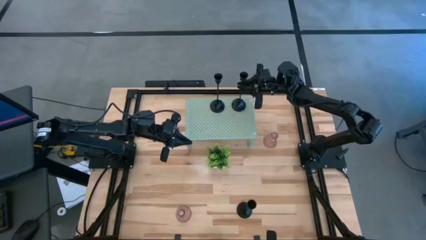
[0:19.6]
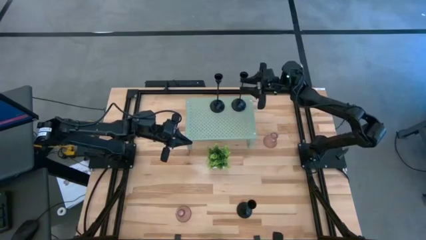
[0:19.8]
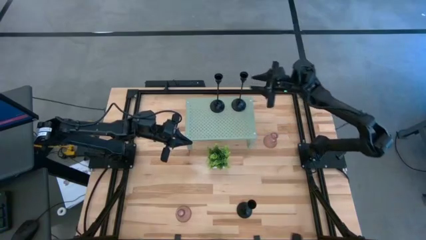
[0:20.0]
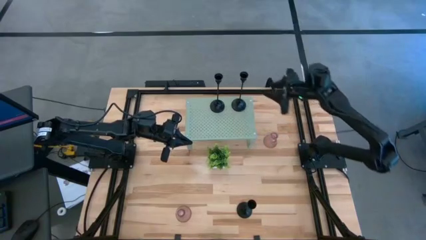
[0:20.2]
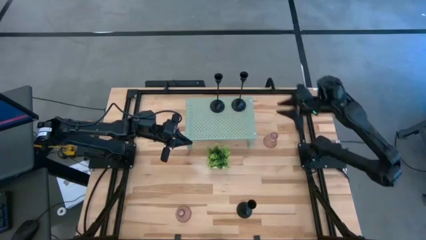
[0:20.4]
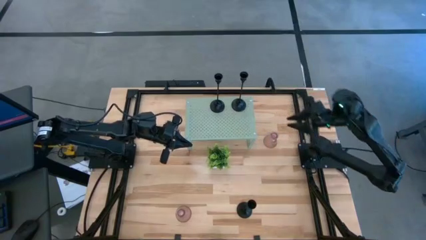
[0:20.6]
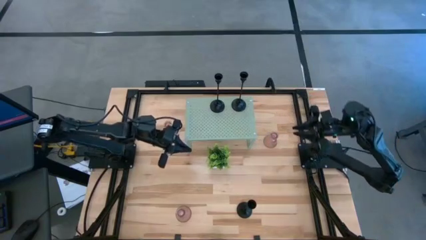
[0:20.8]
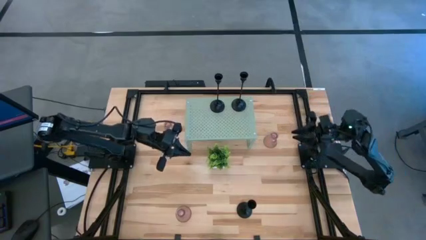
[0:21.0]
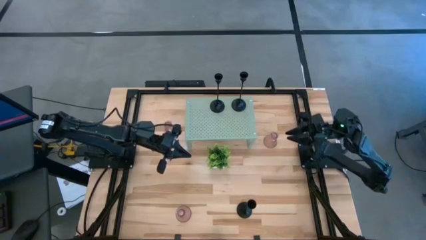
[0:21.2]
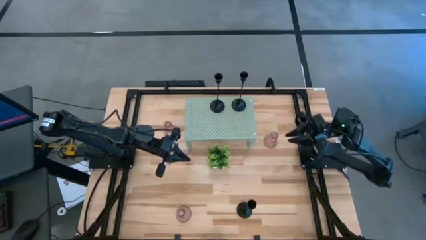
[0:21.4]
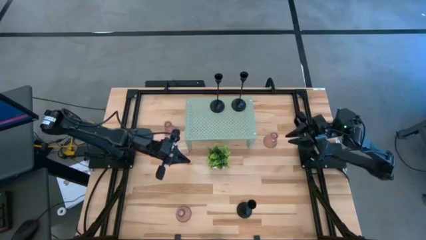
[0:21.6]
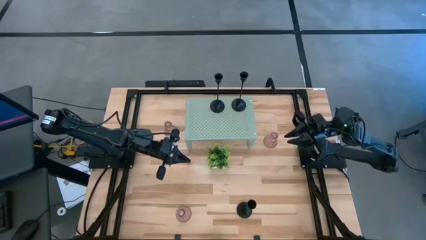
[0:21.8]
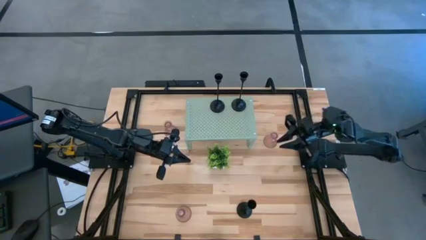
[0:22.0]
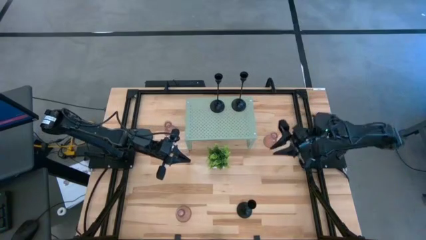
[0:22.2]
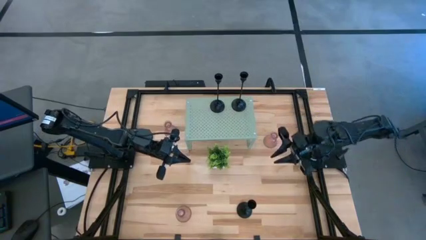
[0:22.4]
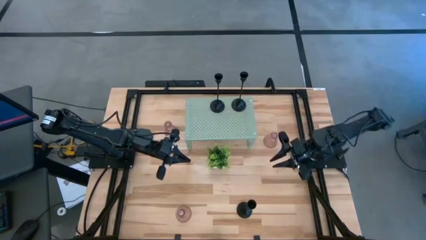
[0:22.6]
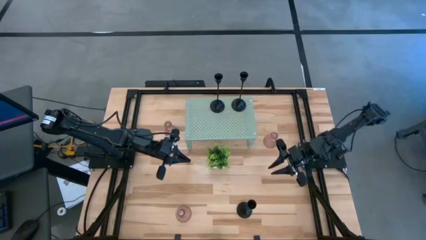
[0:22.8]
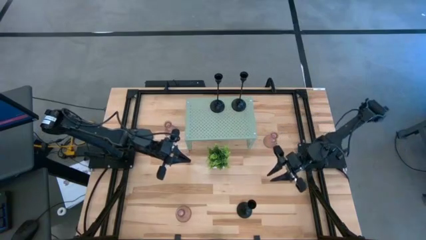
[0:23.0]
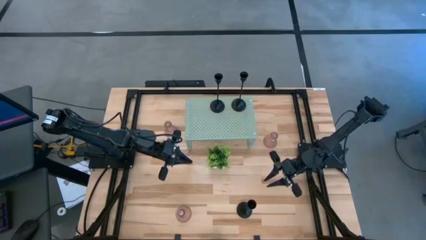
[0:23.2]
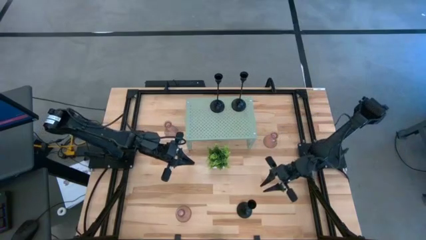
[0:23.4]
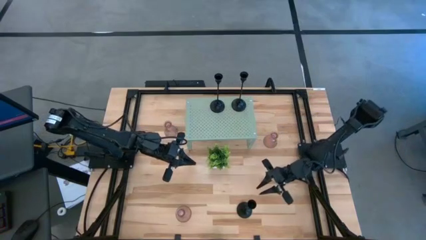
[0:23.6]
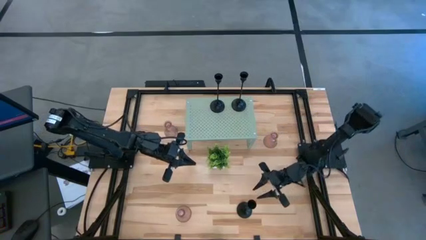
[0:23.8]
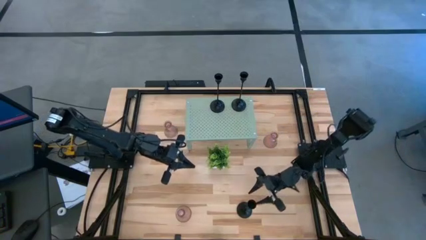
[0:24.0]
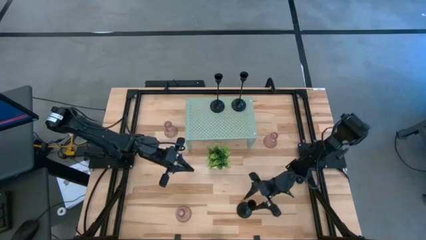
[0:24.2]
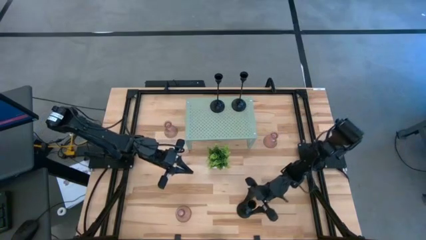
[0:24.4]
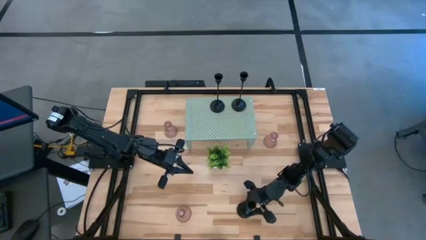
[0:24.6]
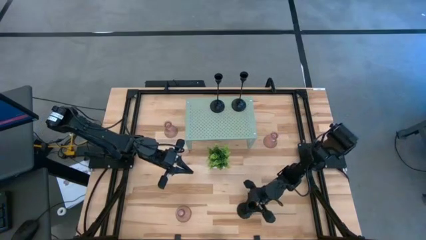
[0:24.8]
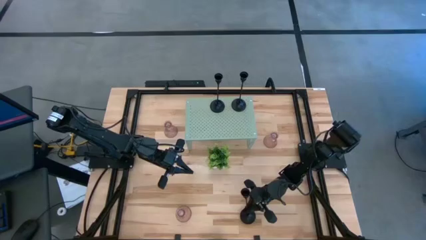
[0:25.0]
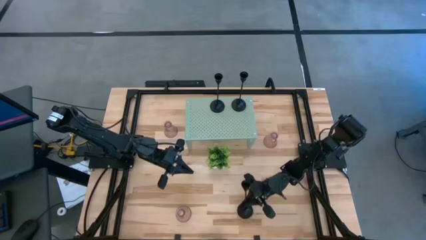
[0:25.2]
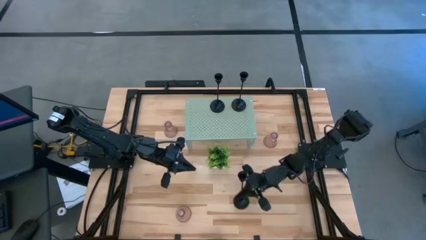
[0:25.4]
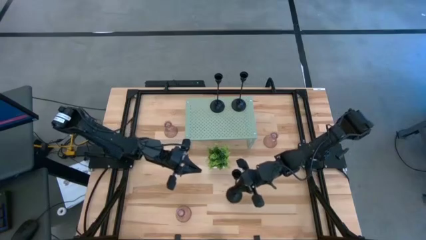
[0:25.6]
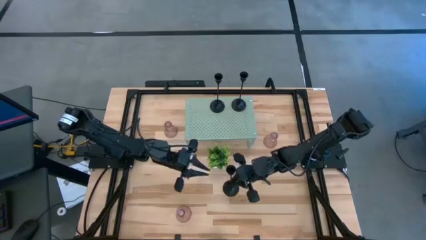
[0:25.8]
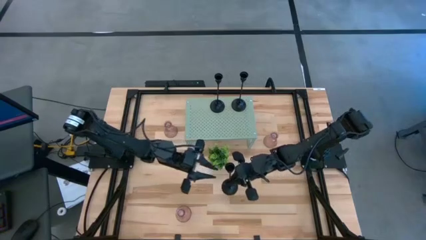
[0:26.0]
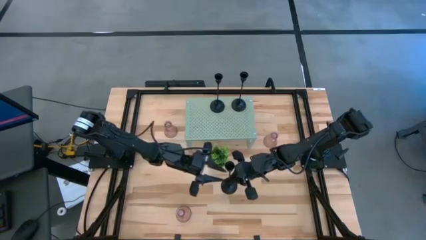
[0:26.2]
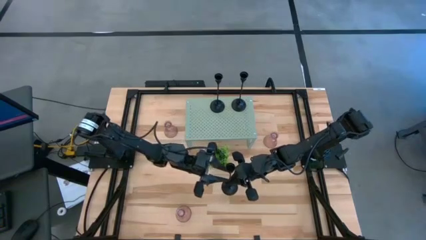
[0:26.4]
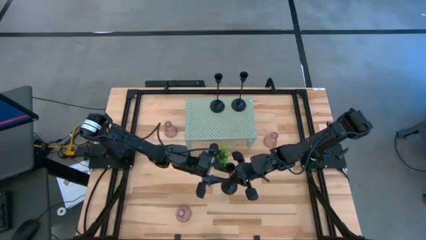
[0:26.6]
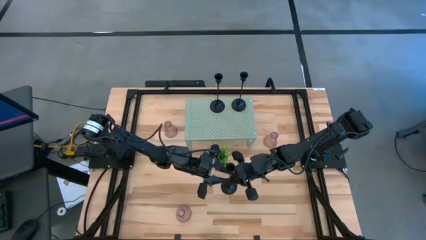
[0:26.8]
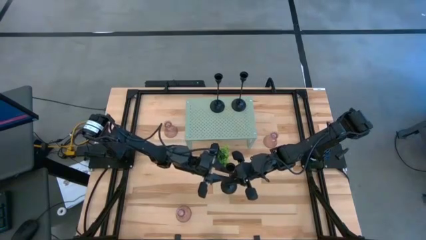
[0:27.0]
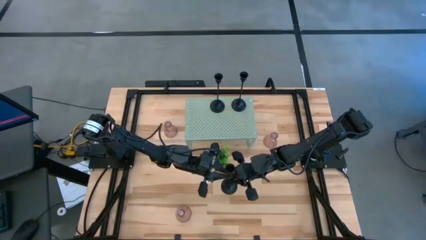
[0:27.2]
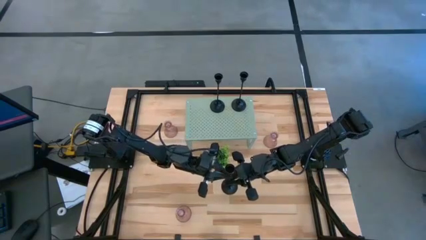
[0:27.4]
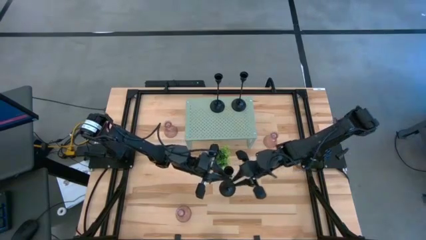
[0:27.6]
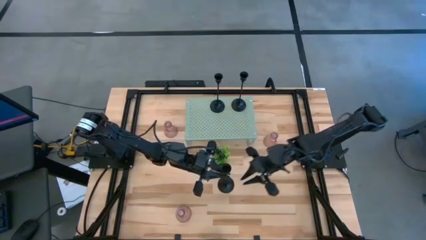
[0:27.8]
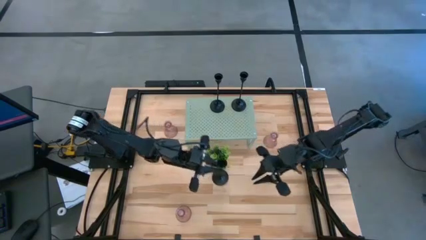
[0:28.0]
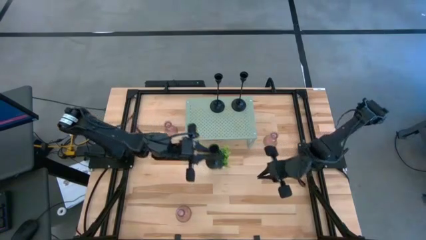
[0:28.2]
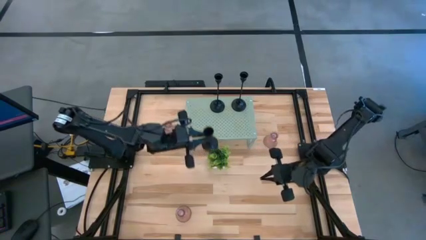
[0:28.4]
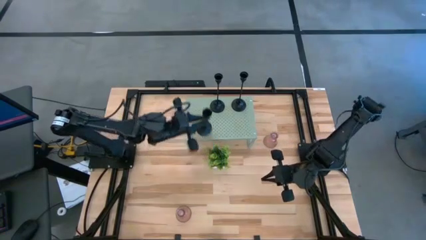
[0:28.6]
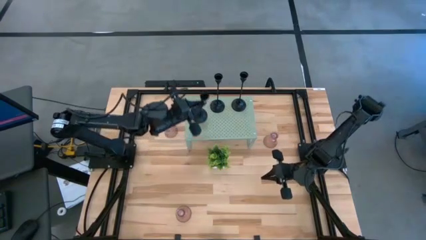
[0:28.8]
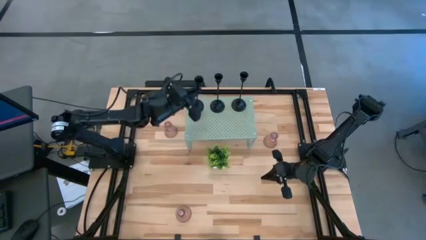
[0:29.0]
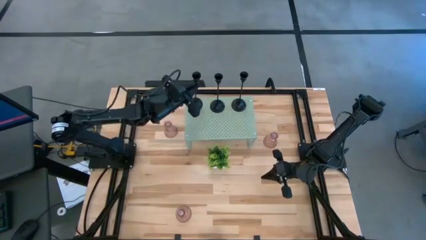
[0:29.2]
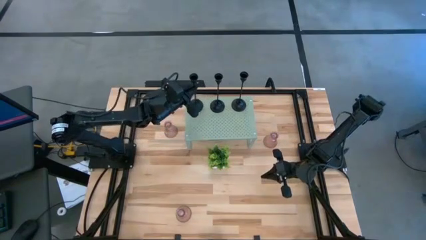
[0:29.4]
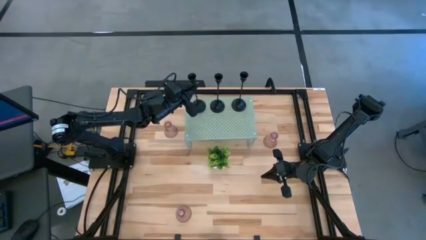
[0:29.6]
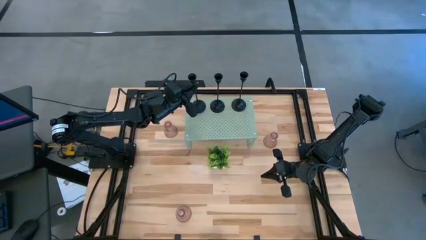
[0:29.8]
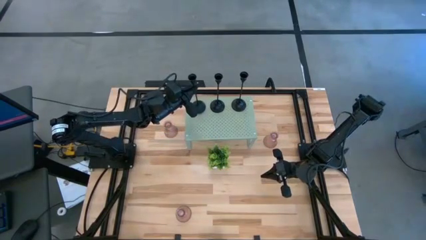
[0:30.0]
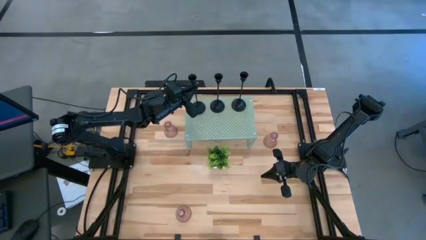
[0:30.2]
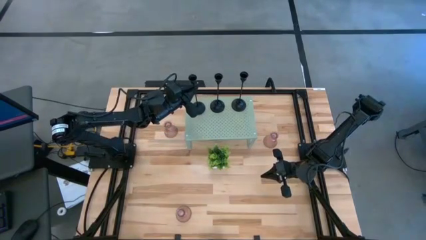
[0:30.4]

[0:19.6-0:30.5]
Task: Pick & Place candle stick holders
Put the black candle holder on the shelf

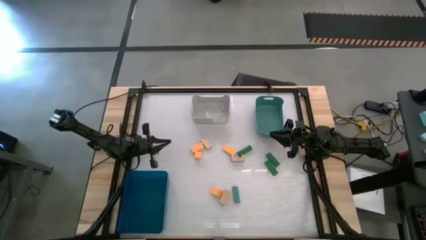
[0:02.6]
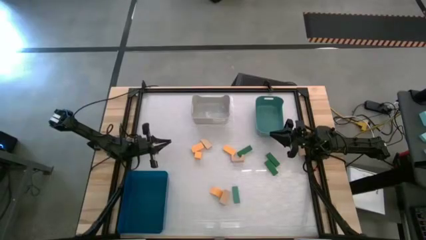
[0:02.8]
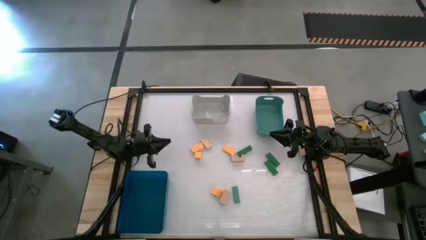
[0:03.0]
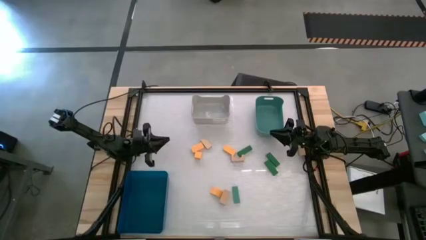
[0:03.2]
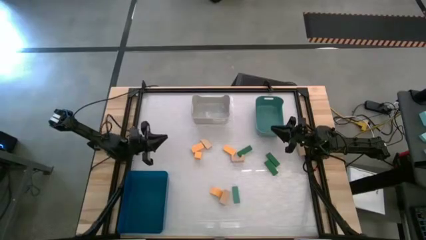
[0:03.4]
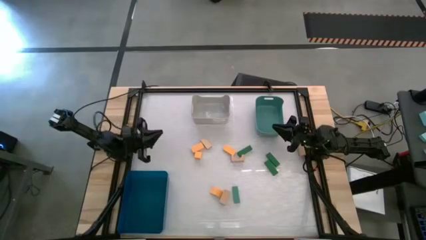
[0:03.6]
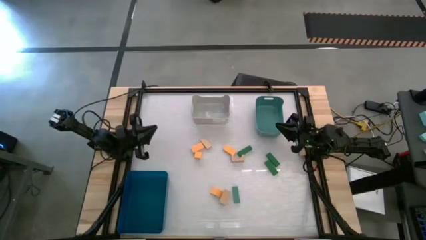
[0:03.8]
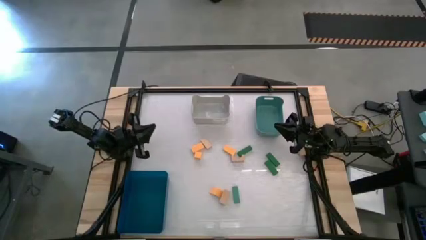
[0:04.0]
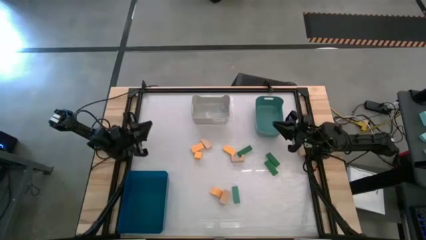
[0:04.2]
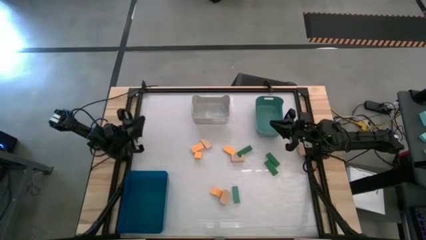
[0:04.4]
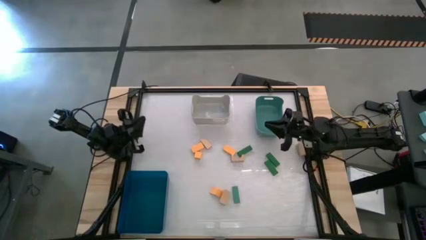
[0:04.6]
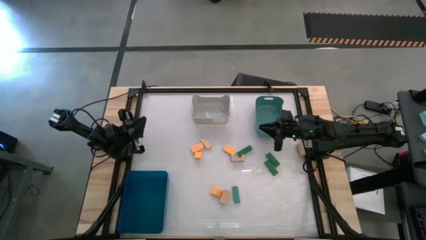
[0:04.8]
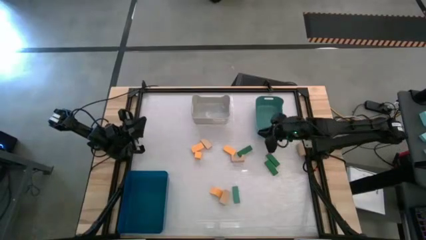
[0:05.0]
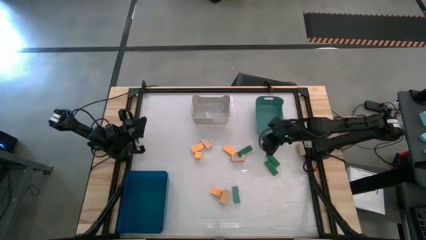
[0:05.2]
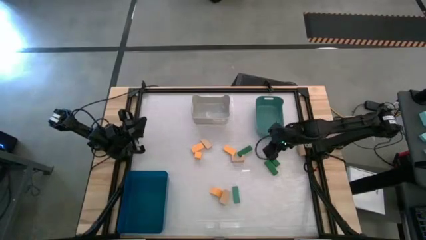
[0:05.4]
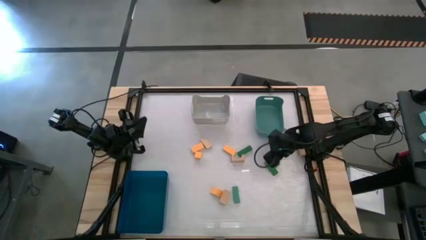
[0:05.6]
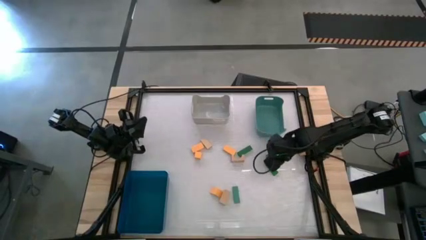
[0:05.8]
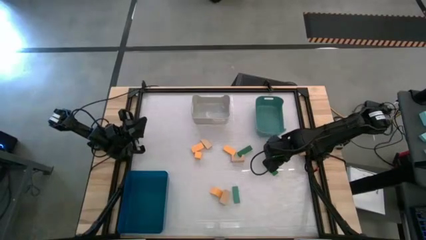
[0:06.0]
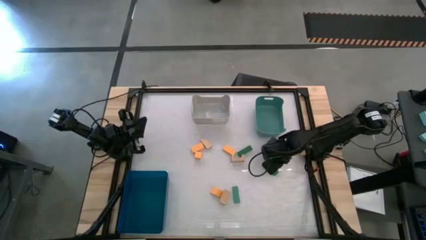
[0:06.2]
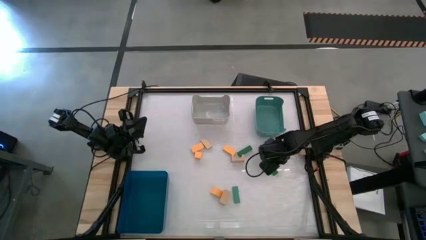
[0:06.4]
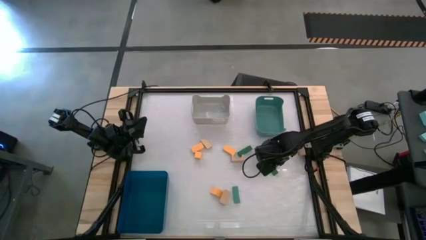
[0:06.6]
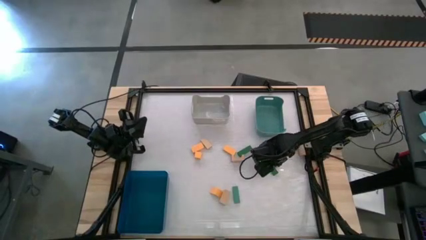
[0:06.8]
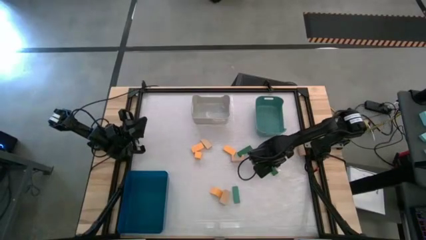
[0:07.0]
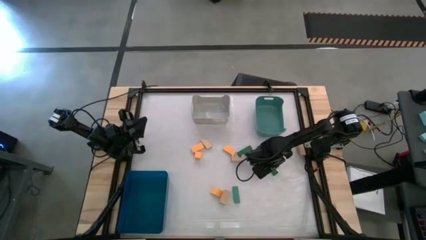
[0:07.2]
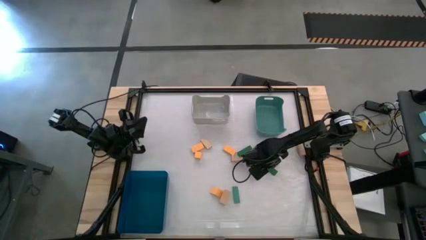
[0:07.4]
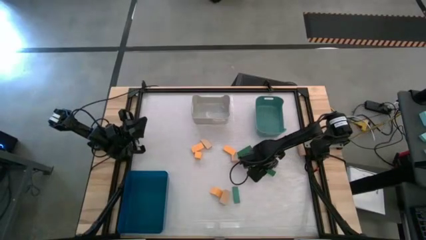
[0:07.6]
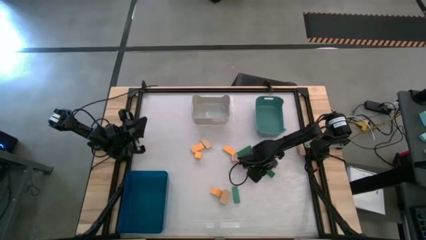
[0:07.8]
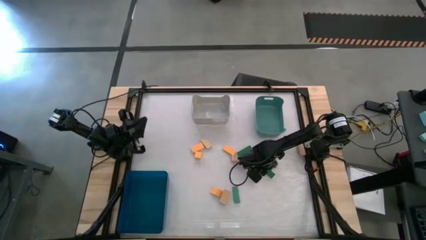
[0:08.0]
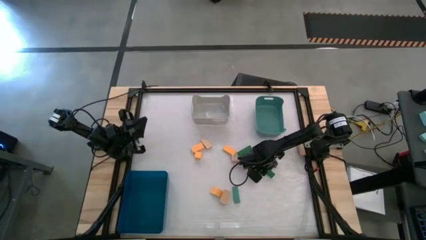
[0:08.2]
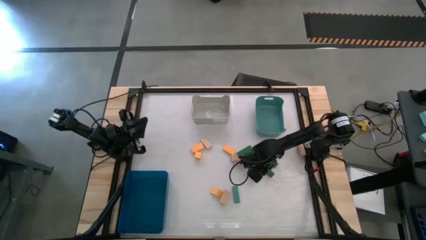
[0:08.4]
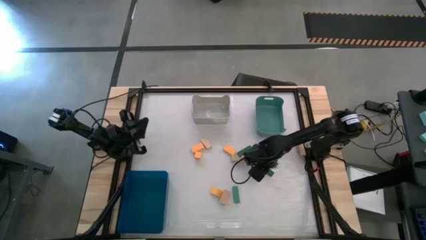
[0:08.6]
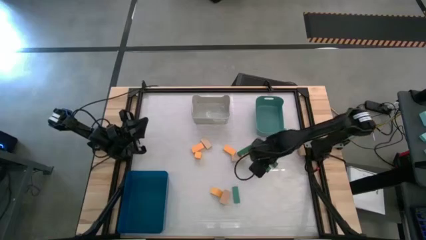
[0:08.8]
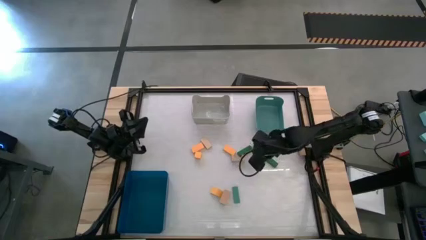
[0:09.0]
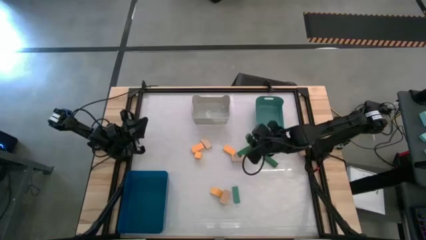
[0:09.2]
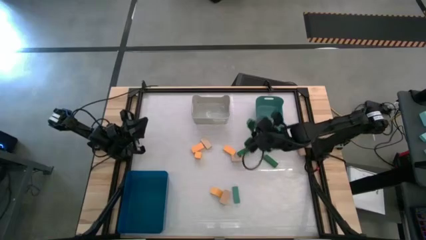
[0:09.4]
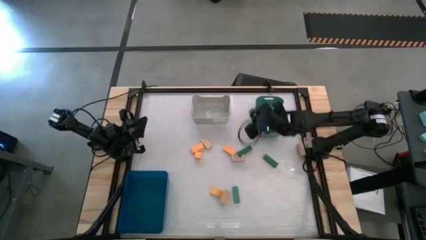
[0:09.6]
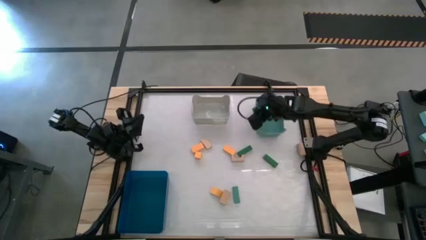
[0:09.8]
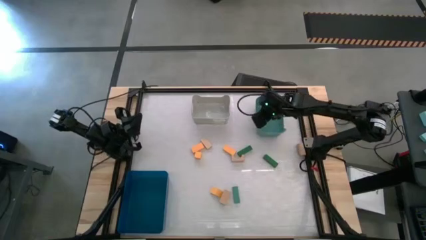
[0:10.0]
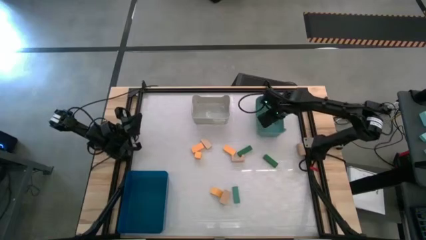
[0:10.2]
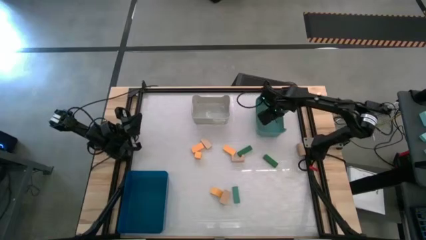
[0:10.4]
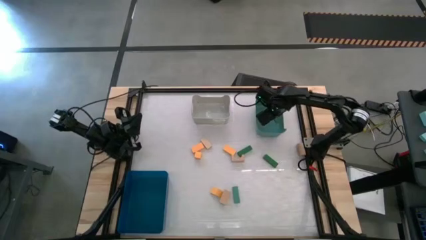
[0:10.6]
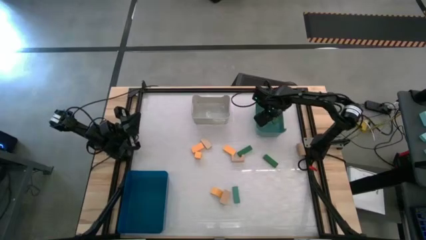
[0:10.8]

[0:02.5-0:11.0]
Task: Sort & place blocks by color
Put the green block into the green bin
